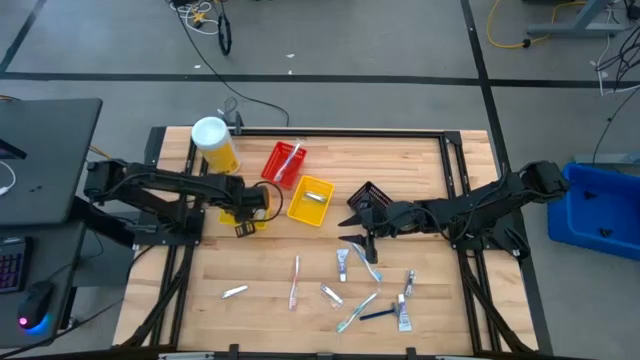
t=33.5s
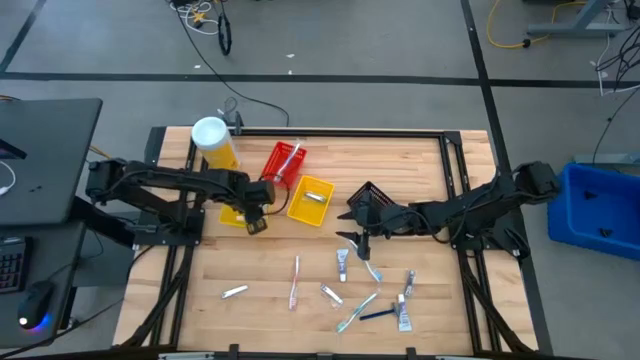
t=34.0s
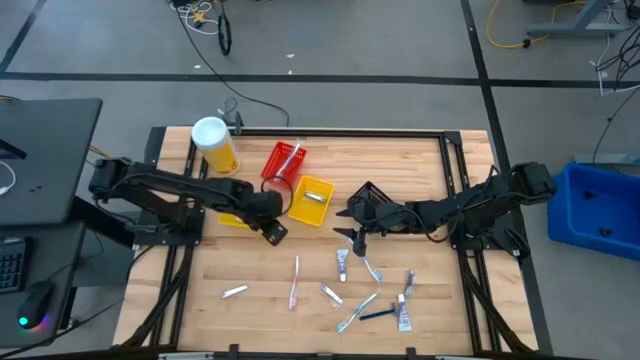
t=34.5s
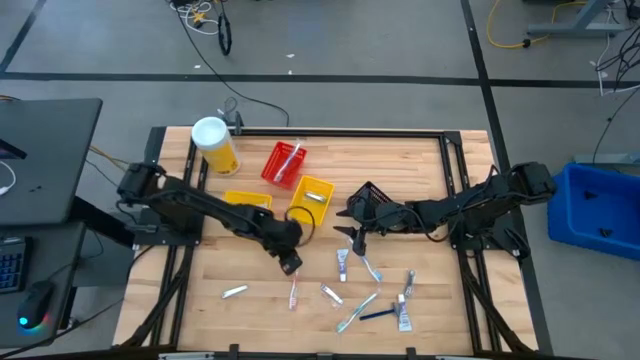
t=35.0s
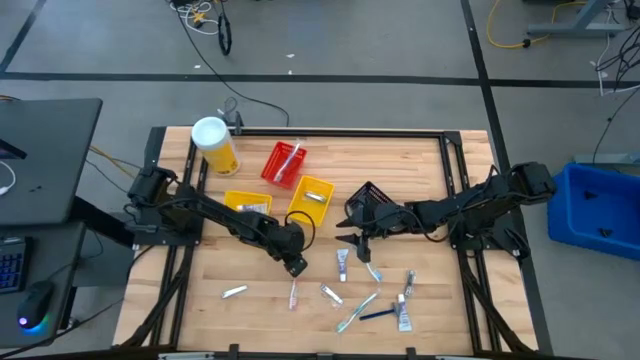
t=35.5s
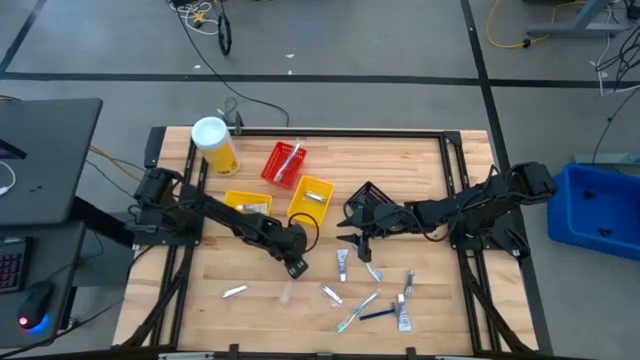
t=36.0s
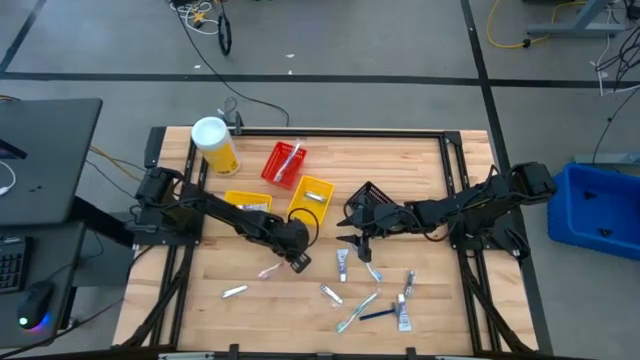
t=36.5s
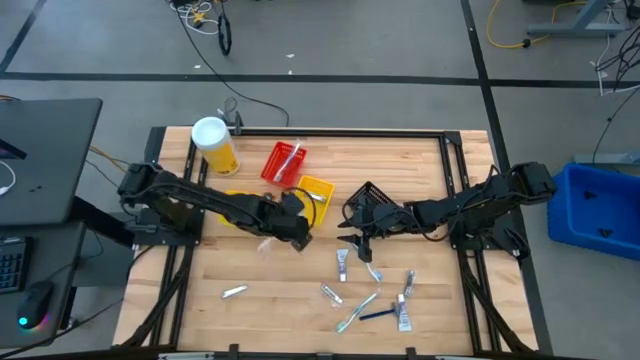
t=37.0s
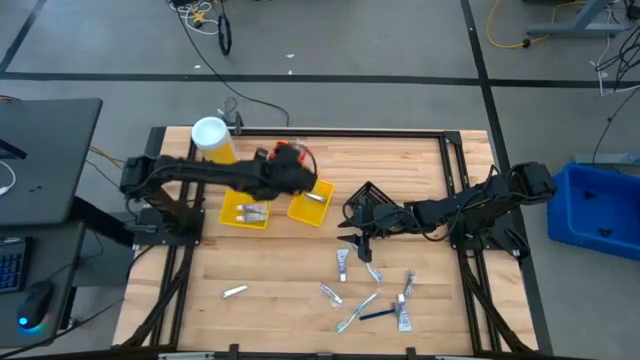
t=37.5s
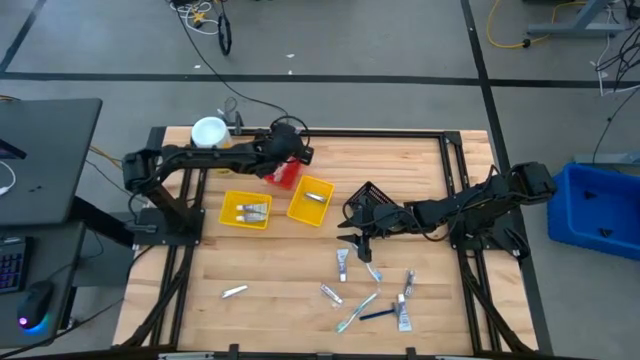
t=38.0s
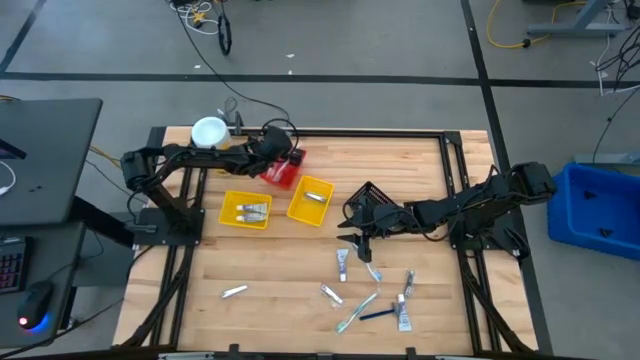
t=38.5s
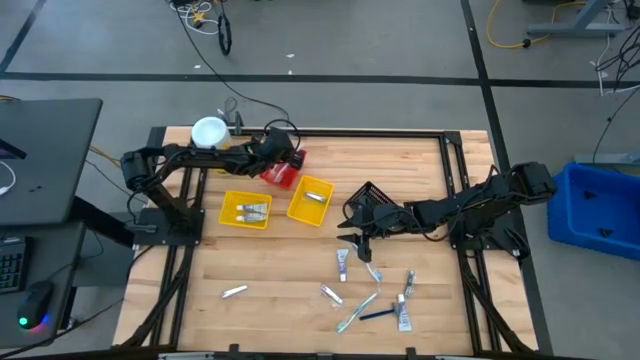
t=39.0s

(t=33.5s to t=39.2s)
Task: Pick & Place Travel size toiletries
Put the orange toothbrush into the red bin

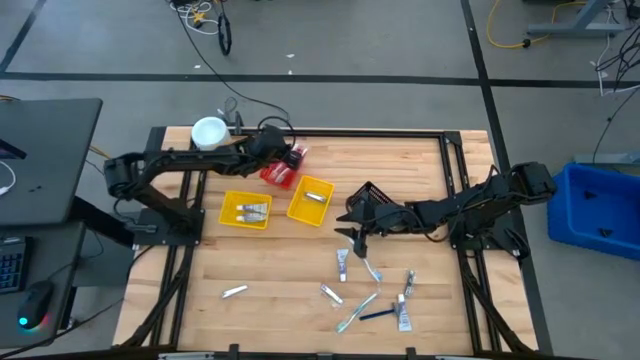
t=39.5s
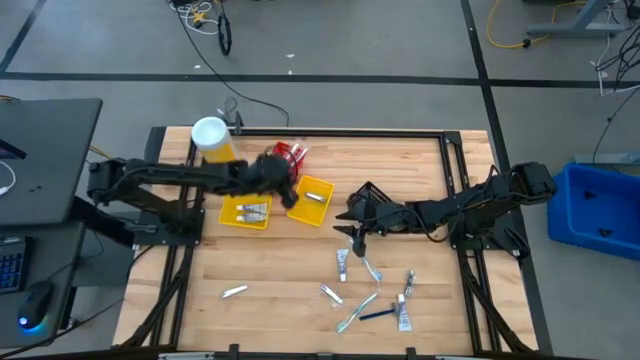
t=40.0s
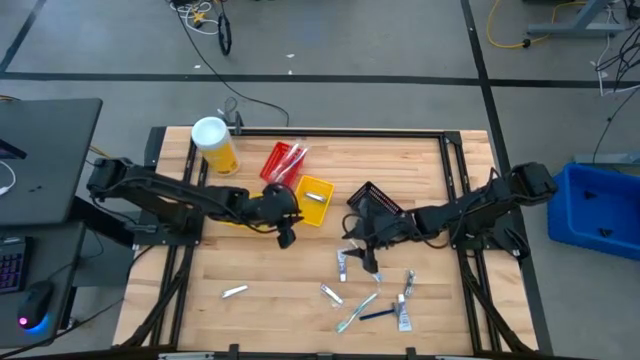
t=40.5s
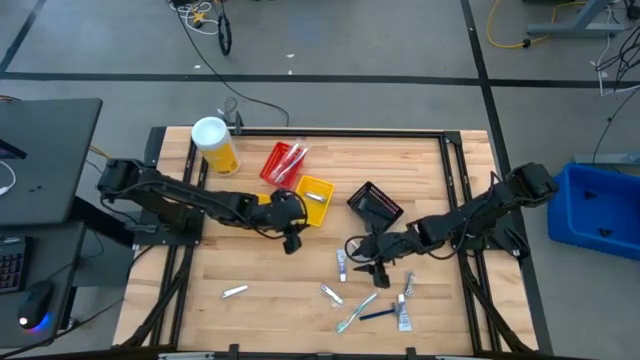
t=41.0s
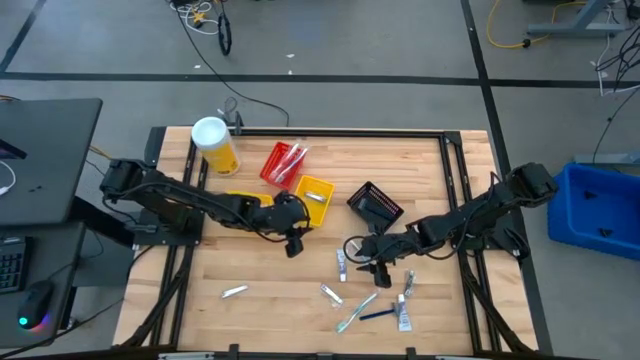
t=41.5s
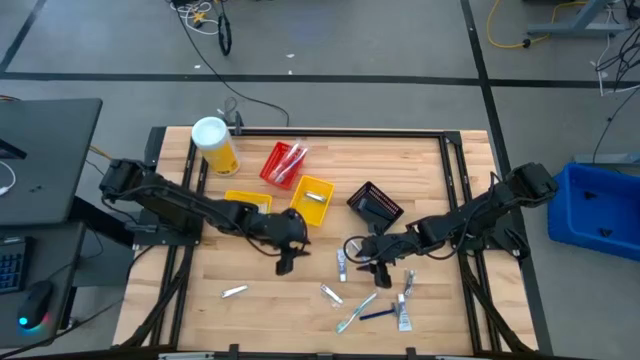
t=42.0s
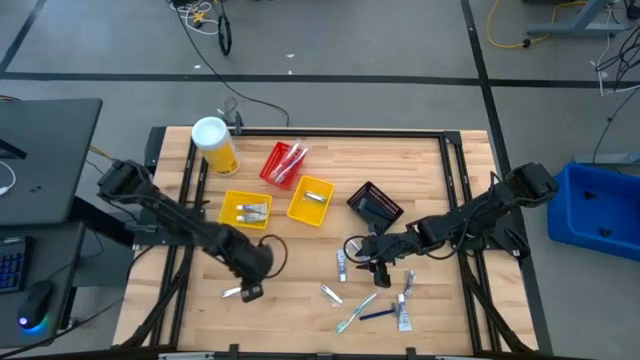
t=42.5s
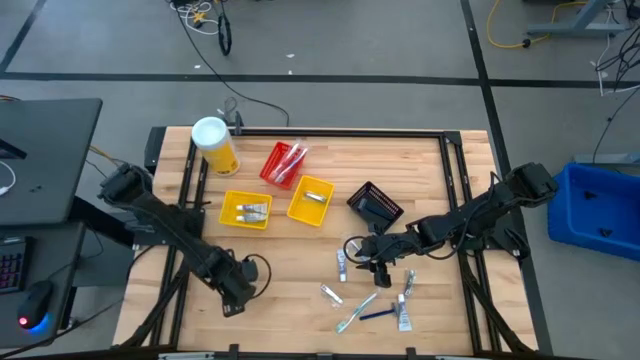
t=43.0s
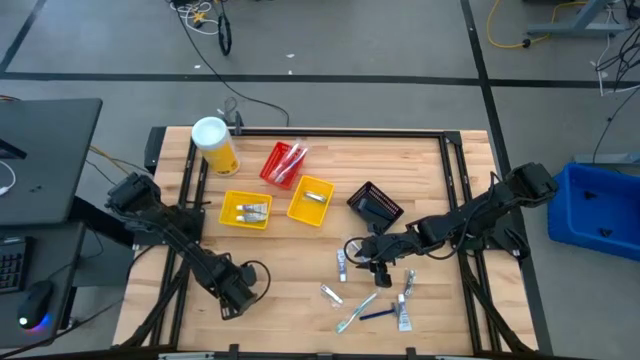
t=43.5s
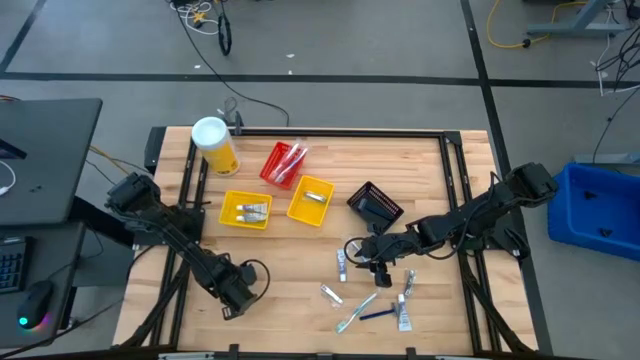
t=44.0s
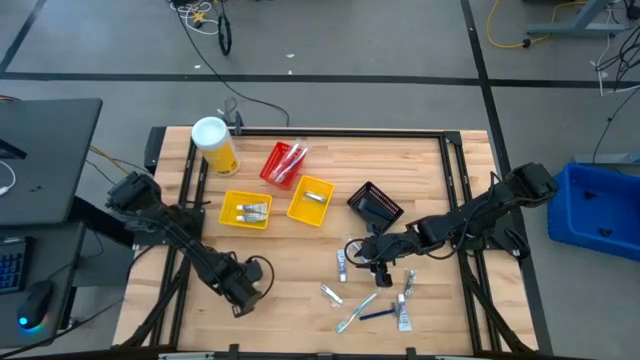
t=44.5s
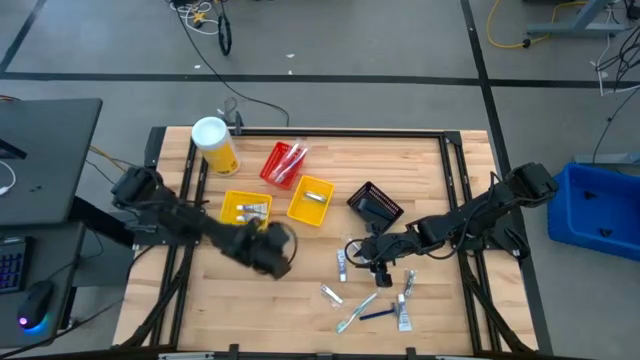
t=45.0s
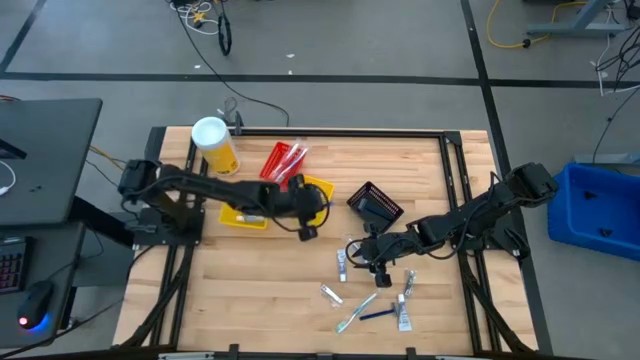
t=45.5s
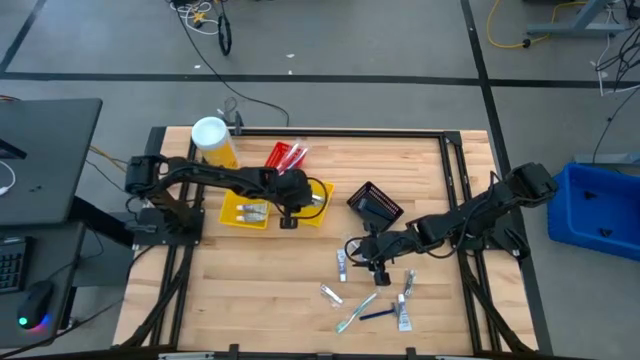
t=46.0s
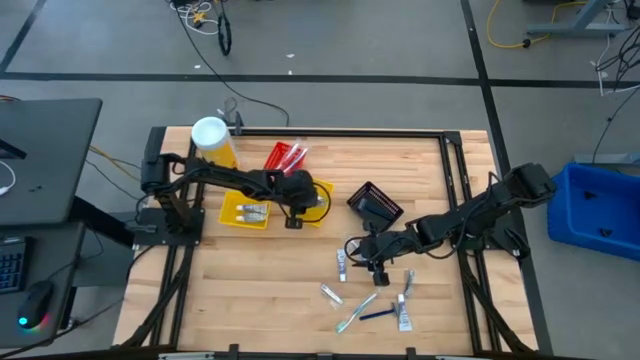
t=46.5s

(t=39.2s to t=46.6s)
Put the silver nail cutter into the right yellow bin

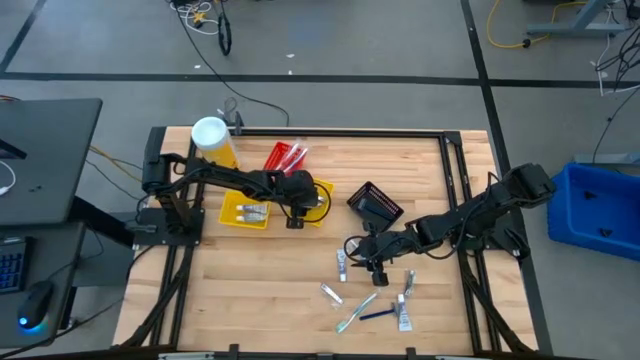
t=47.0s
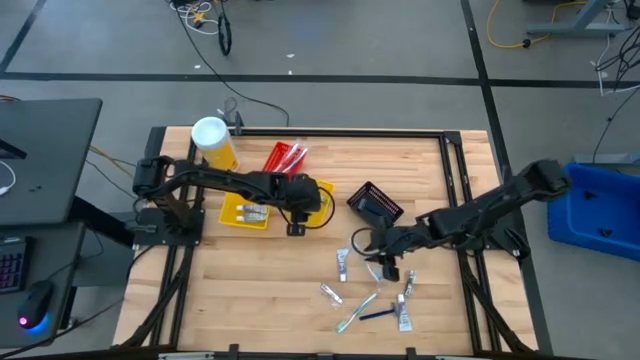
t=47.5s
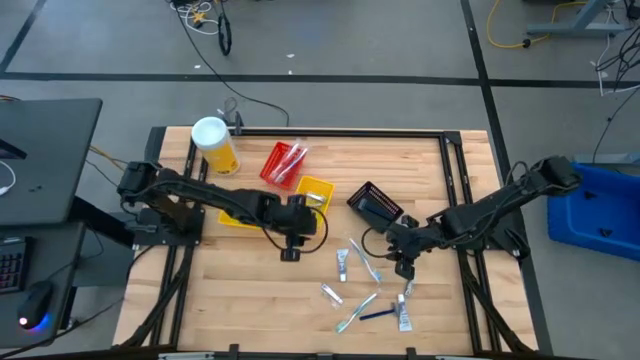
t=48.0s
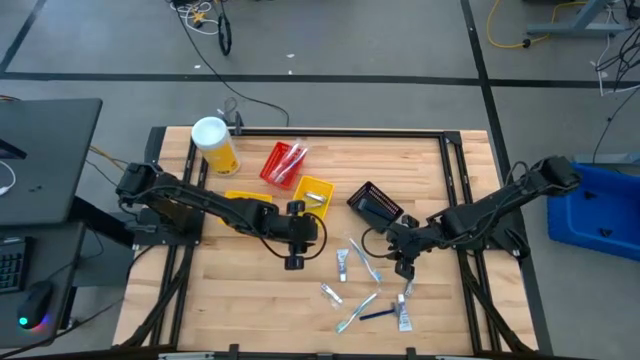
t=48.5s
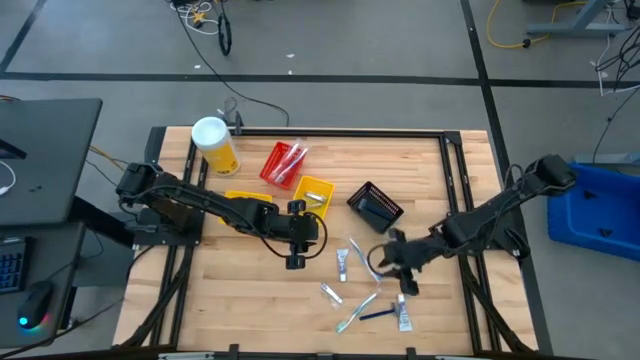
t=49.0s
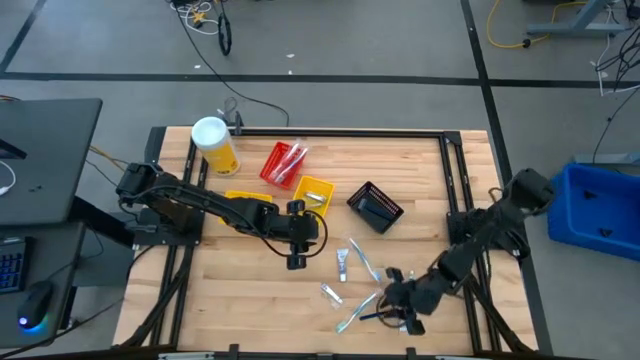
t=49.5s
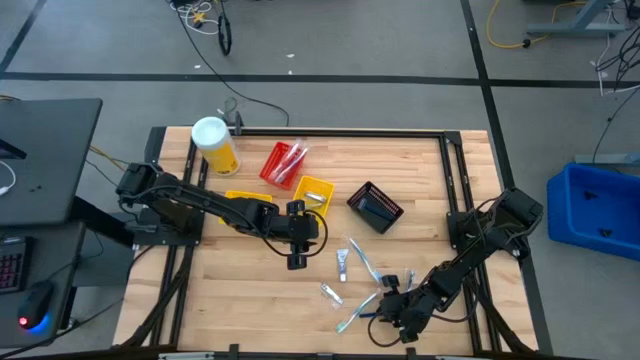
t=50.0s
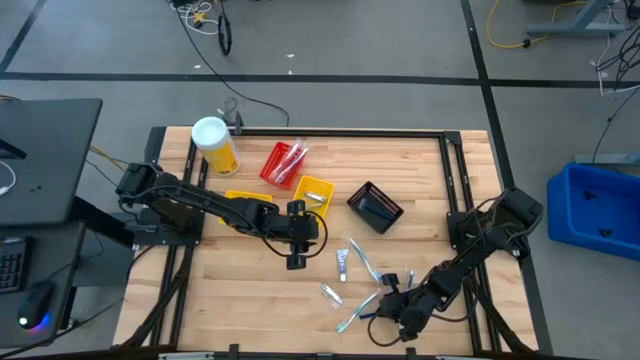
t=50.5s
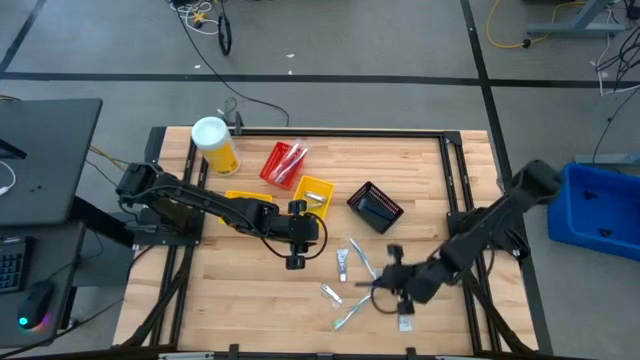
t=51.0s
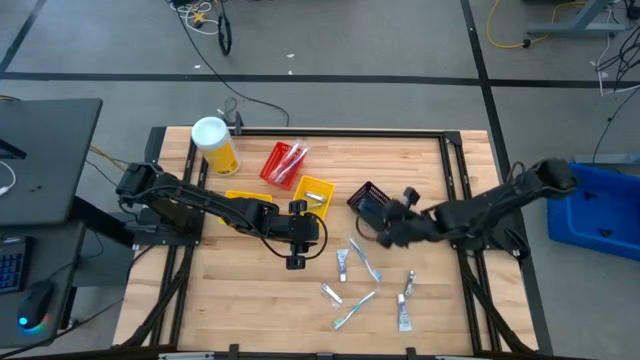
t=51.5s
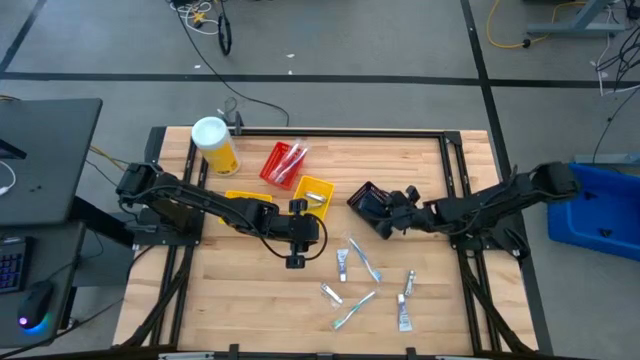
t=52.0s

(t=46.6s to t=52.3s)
Put the blue razor into the black bin

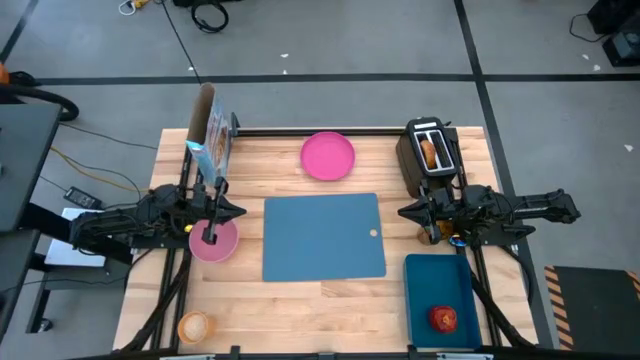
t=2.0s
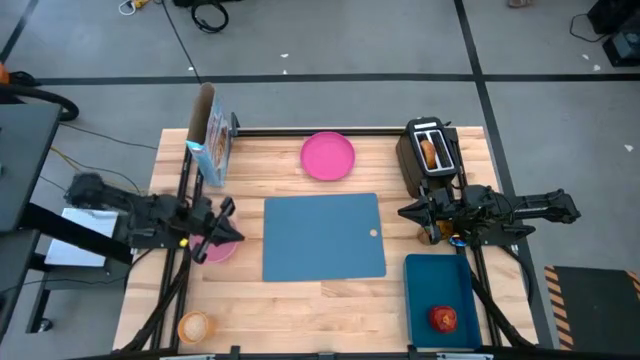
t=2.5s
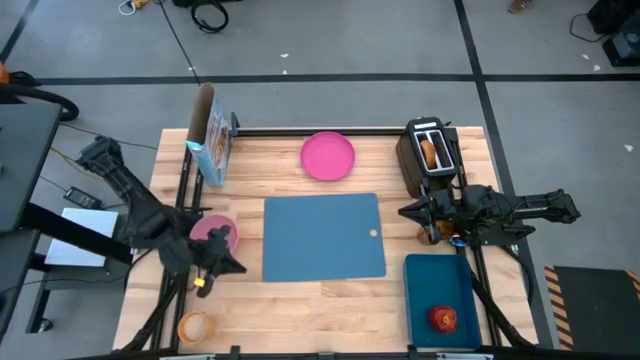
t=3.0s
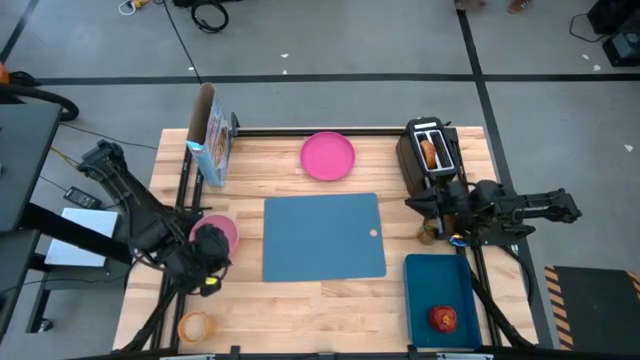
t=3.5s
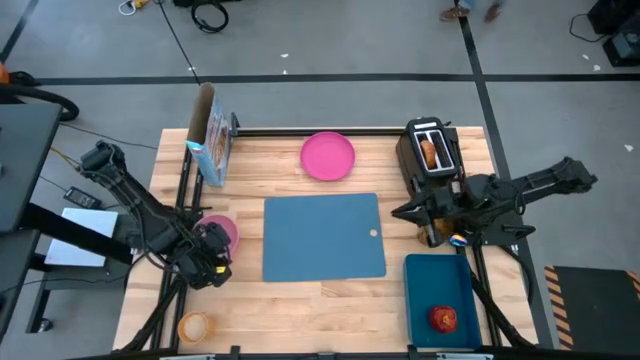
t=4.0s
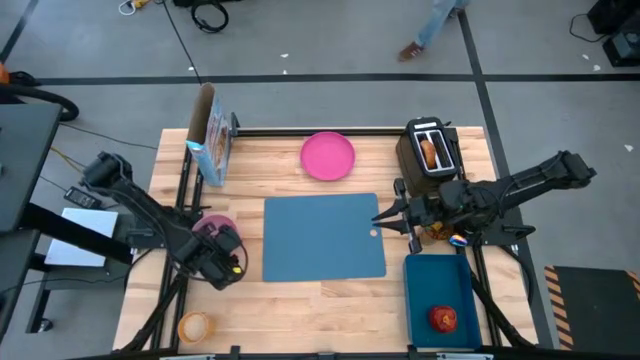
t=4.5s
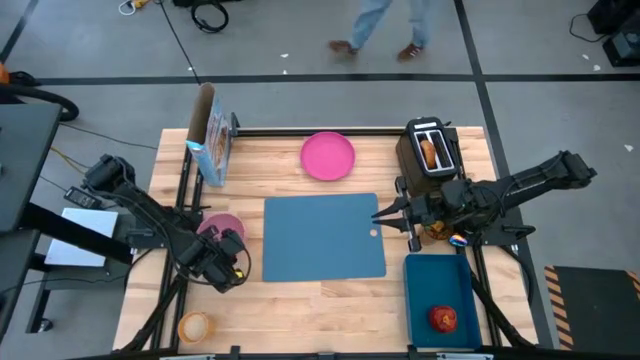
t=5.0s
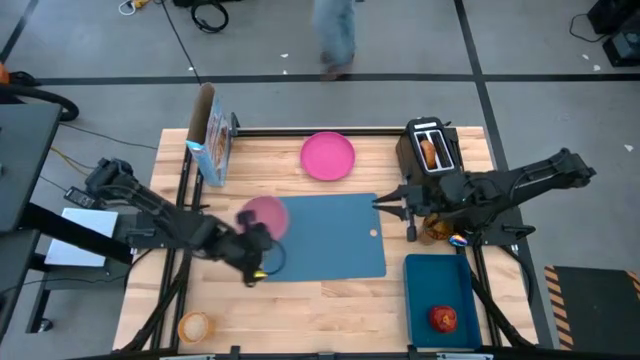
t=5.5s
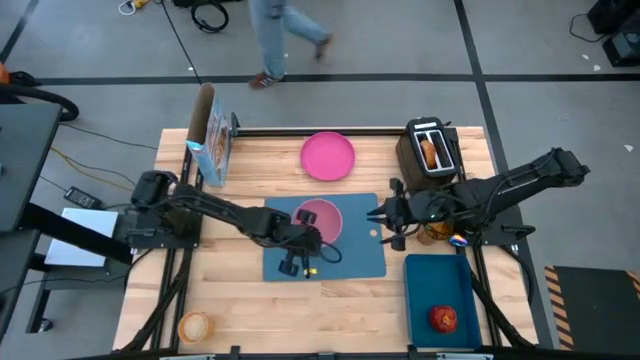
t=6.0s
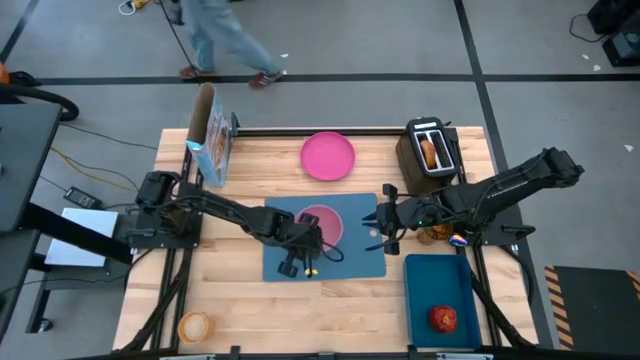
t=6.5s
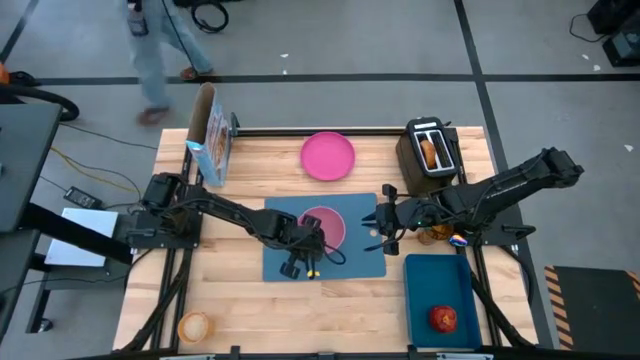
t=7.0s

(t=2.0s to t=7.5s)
Task: Arrange a breakfast setting
Put the pink bowl on the blue placemat
